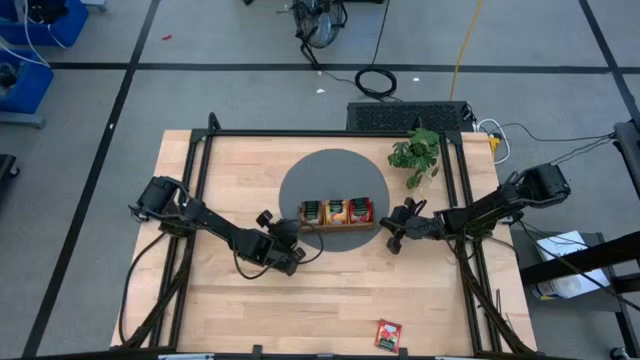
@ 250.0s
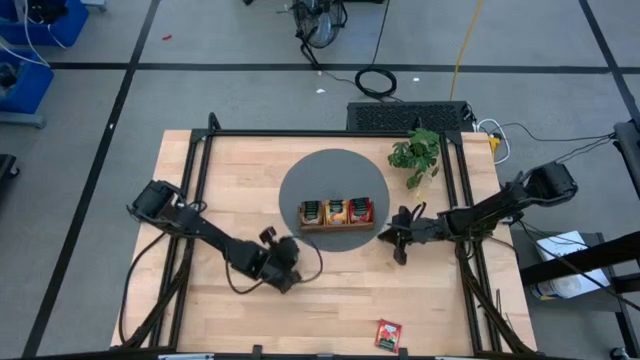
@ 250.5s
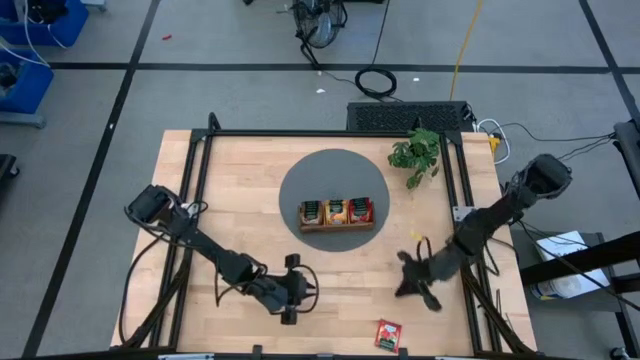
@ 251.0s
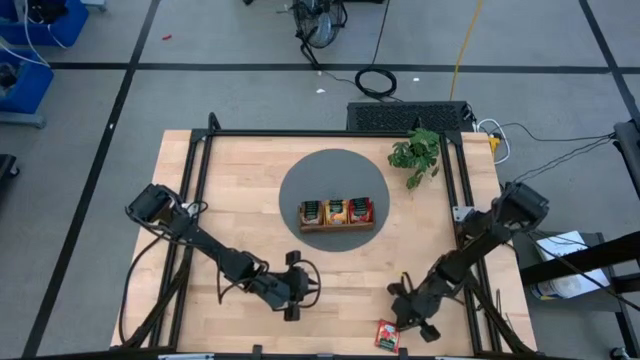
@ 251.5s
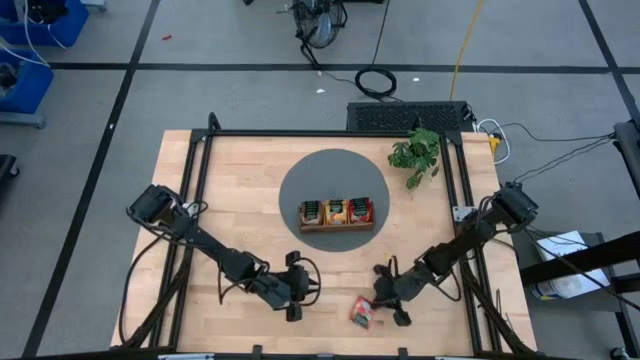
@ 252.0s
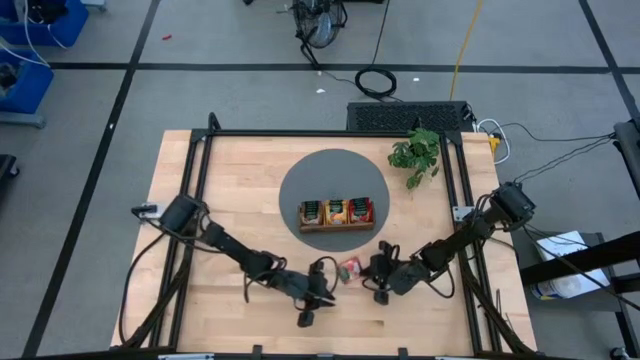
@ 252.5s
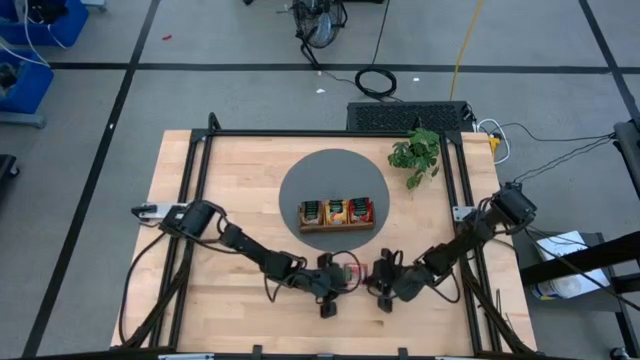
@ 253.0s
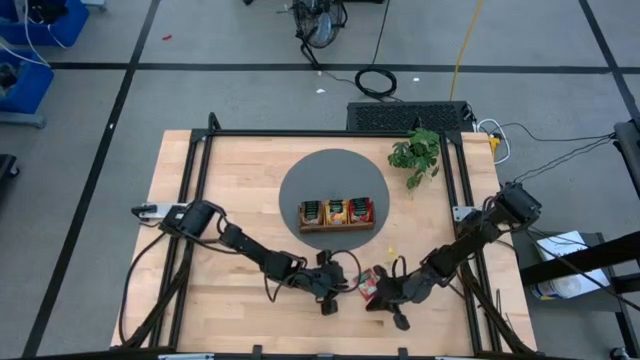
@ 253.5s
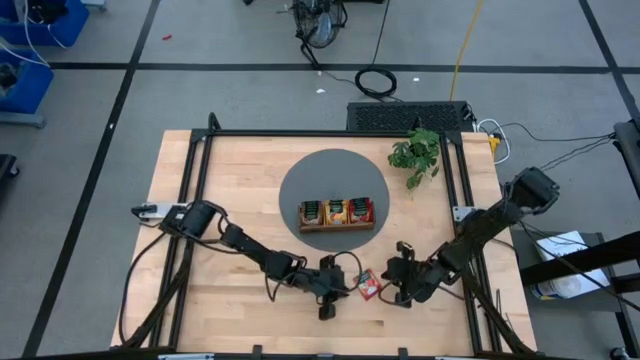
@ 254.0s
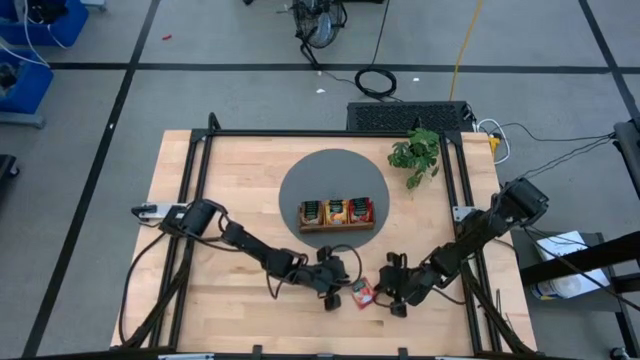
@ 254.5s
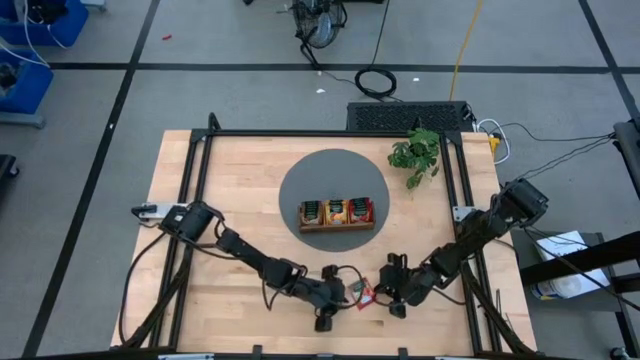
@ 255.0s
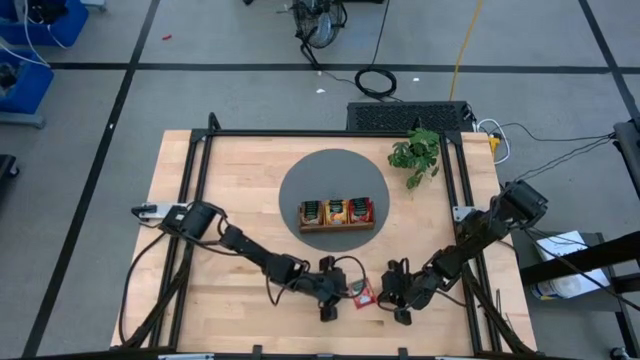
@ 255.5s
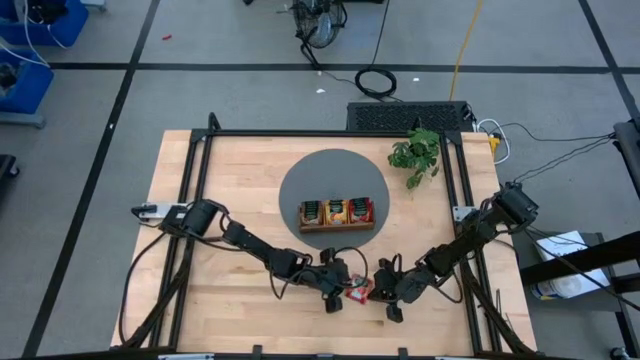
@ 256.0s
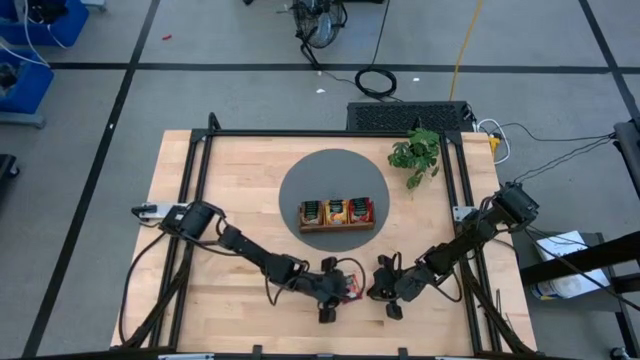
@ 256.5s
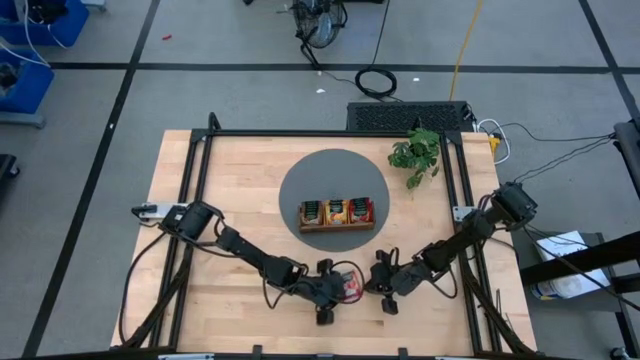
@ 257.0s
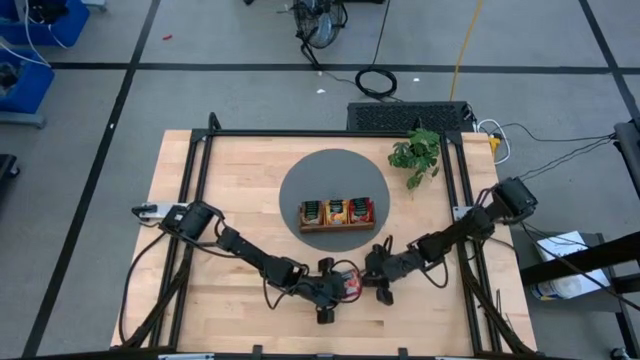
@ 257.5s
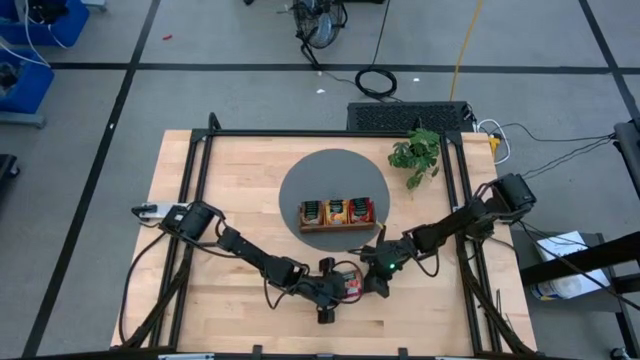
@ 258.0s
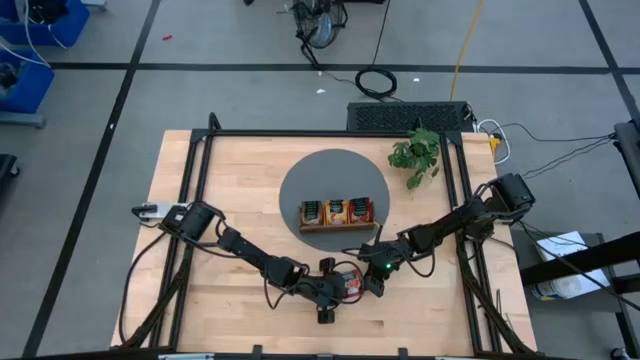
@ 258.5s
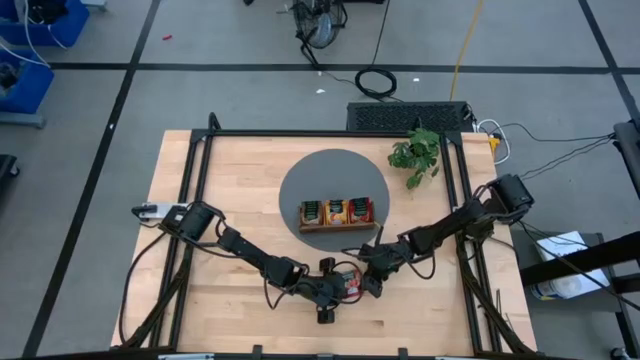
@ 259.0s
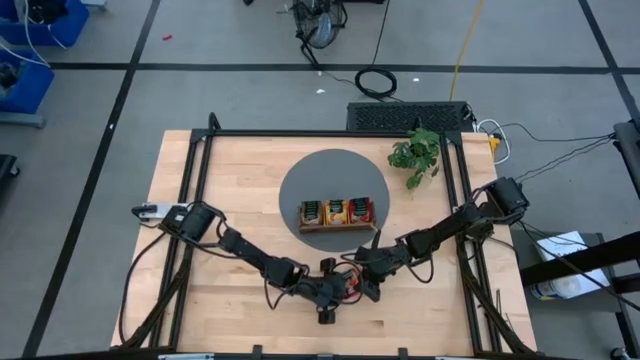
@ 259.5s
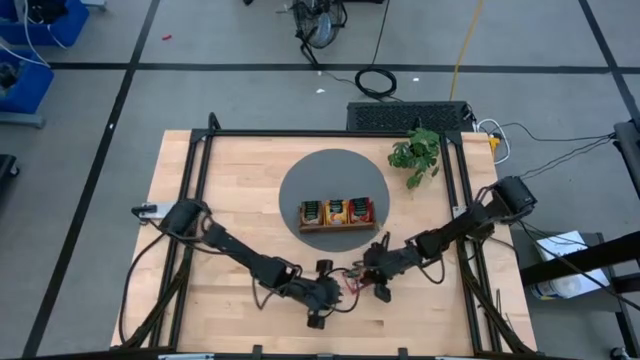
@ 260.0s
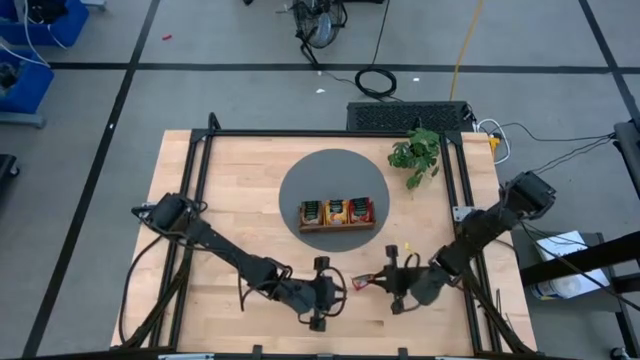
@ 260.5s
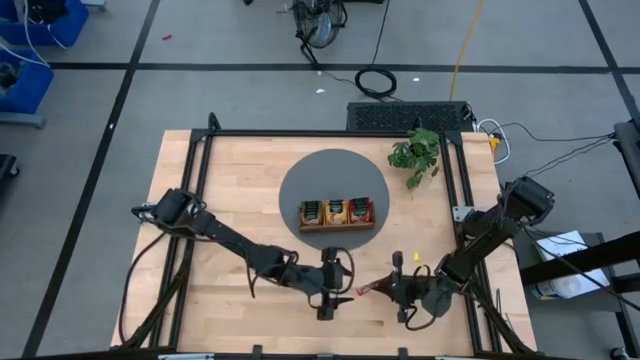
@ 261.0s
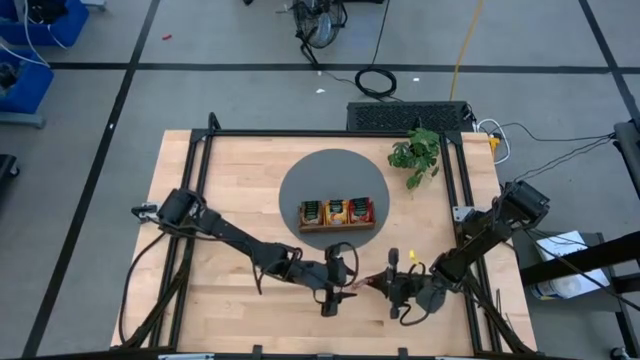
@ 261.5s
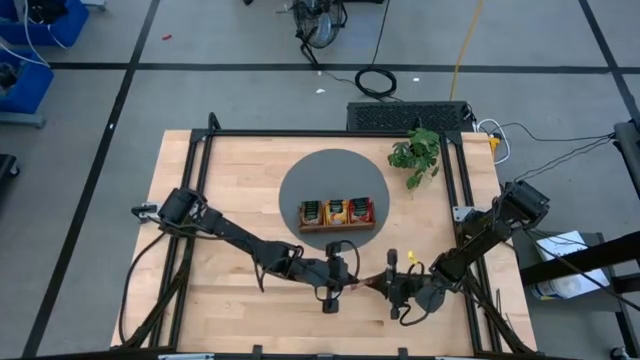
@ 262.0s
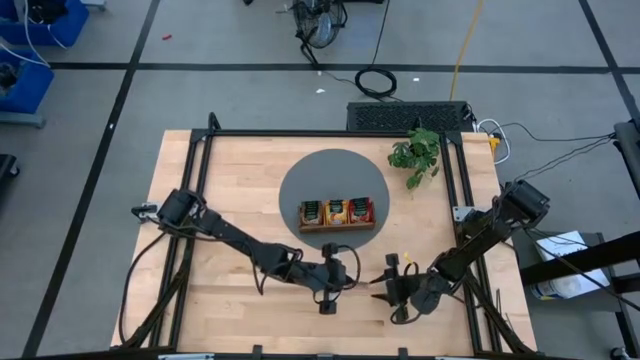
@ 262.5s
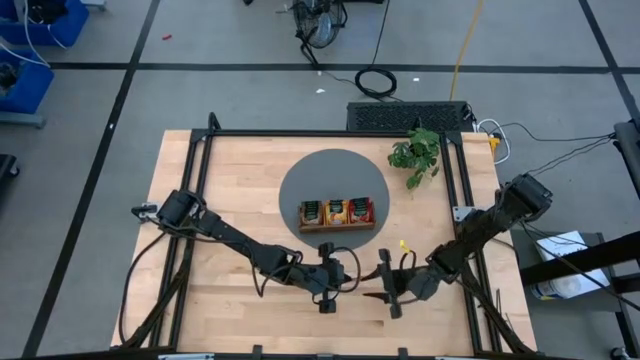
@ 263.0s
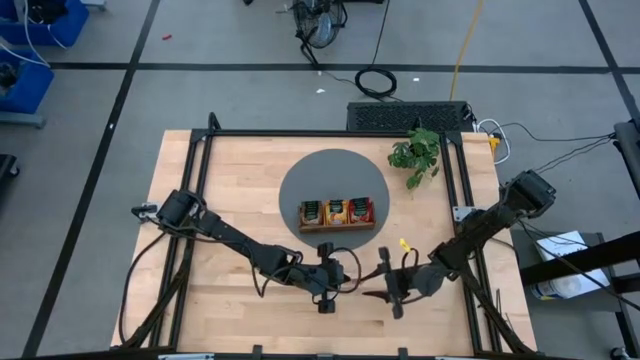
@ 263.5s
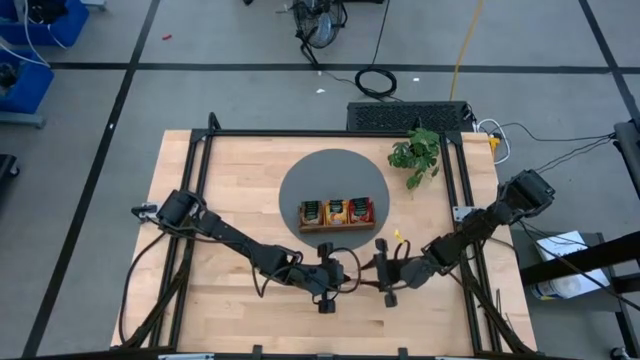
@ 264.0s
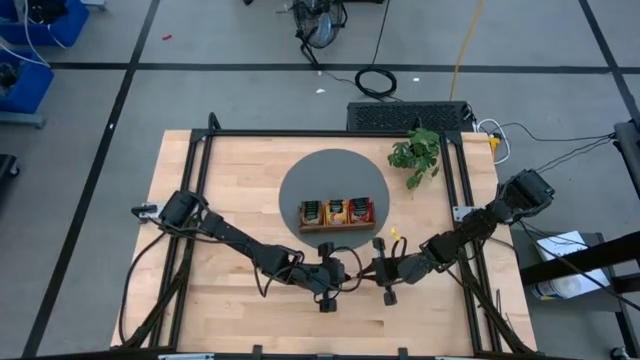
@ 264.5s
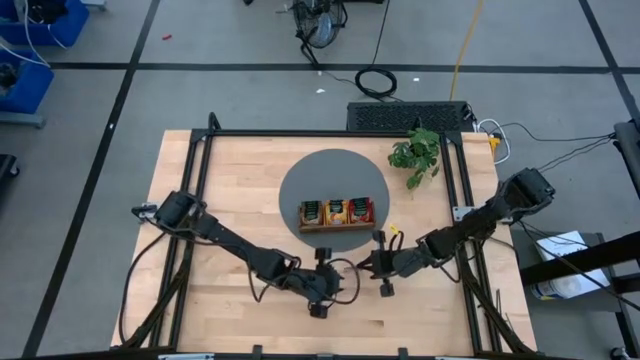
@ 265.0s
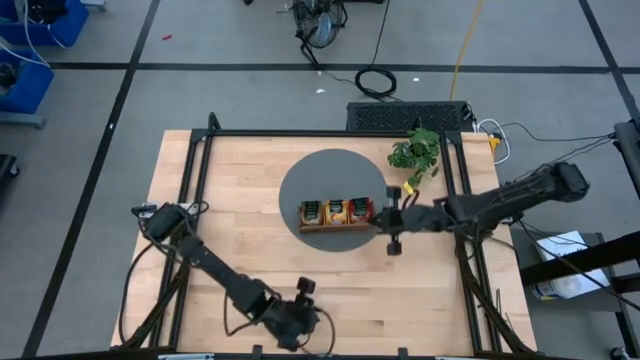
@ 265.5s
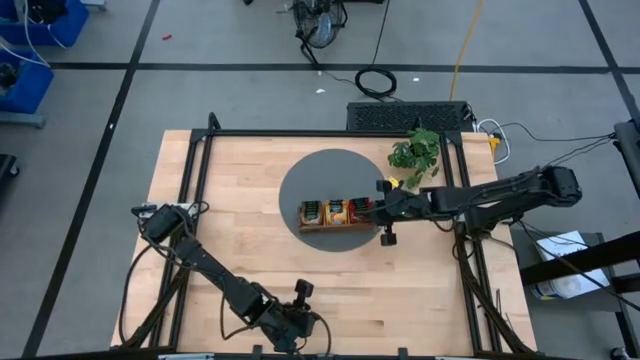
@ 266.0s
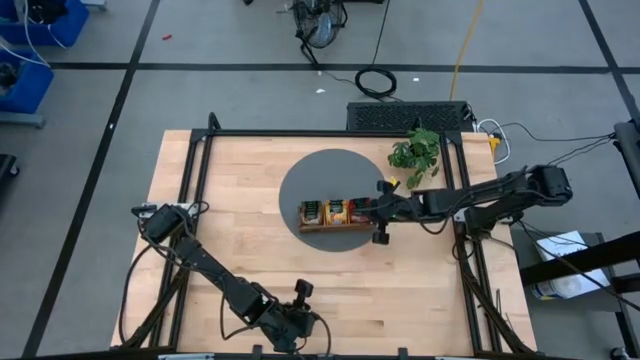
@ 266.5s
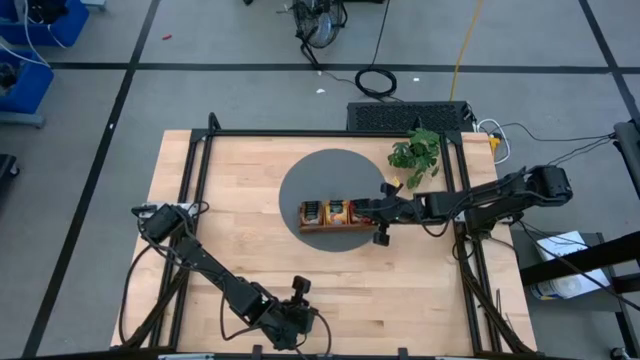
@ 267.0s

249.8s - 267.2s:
Task: Pick & Place Tea
Put the red tea bag into the right slot of the wooden organizer

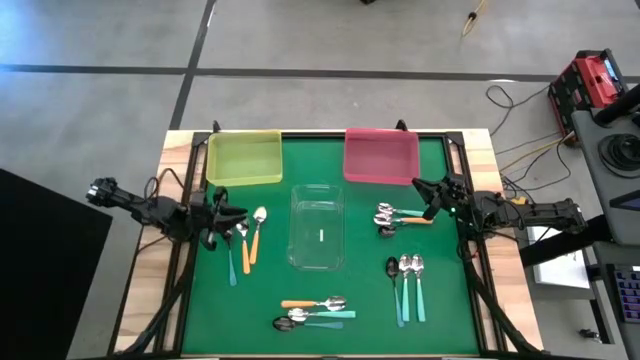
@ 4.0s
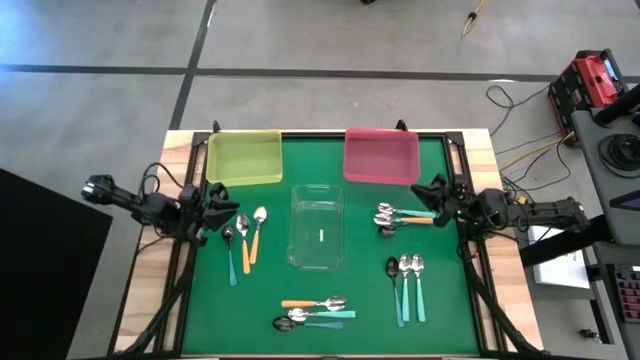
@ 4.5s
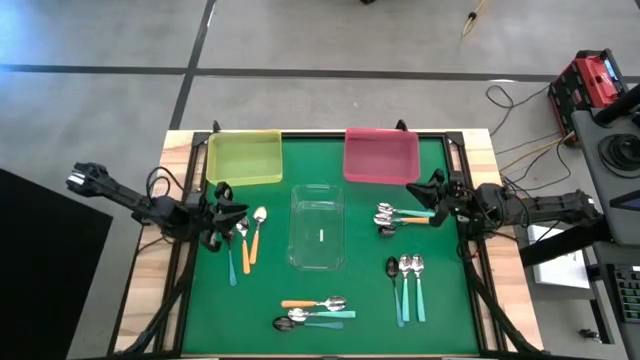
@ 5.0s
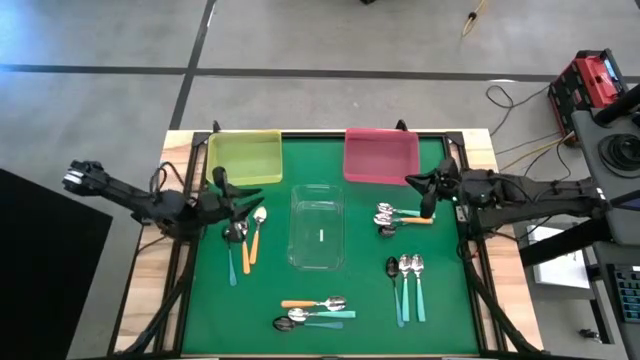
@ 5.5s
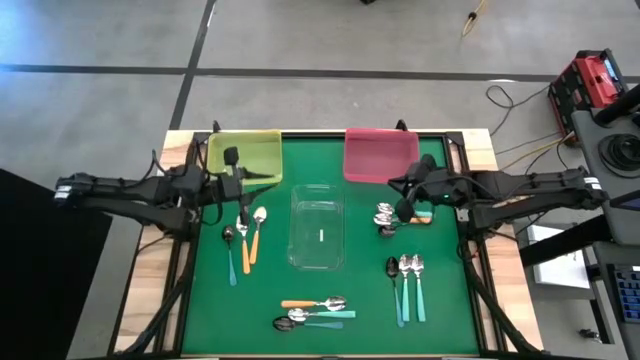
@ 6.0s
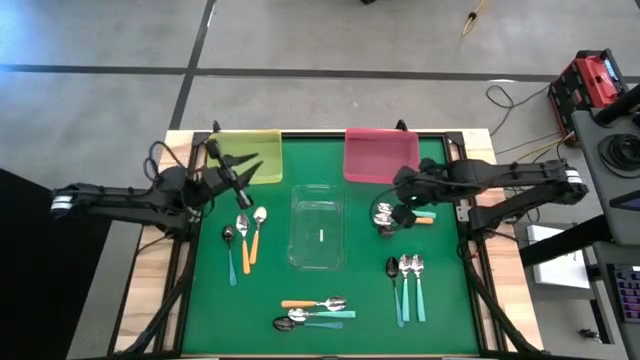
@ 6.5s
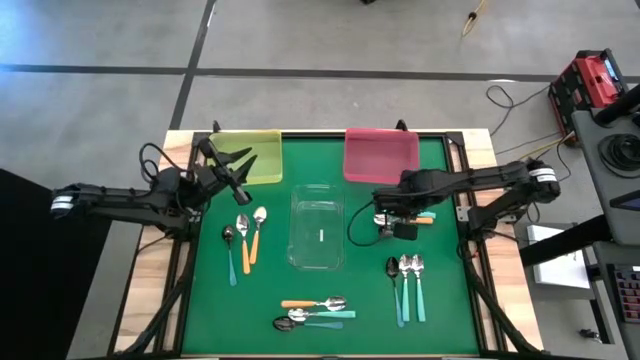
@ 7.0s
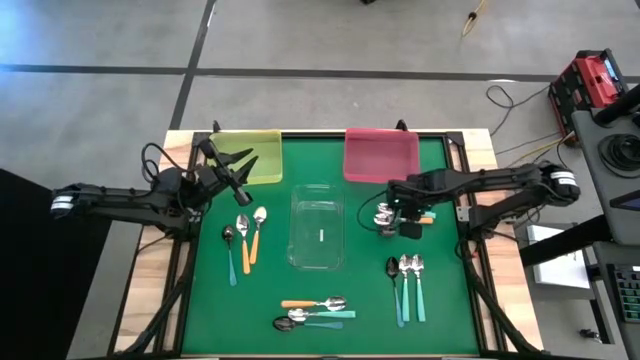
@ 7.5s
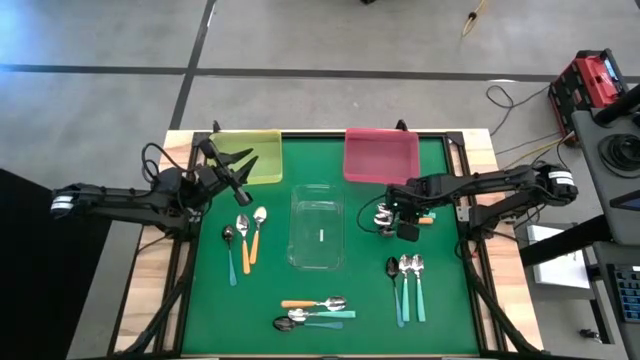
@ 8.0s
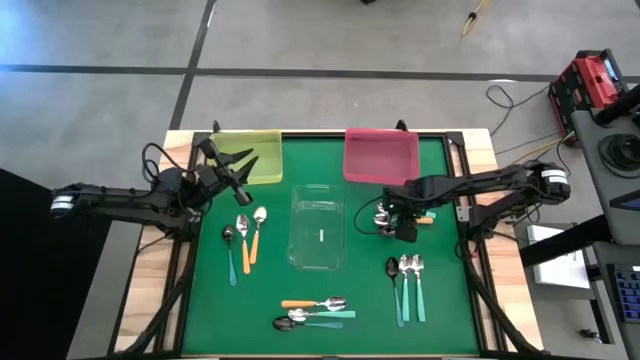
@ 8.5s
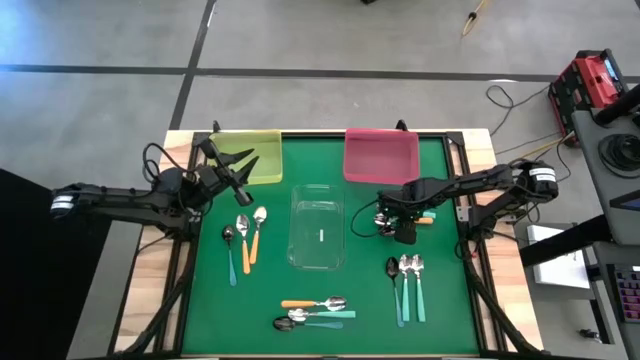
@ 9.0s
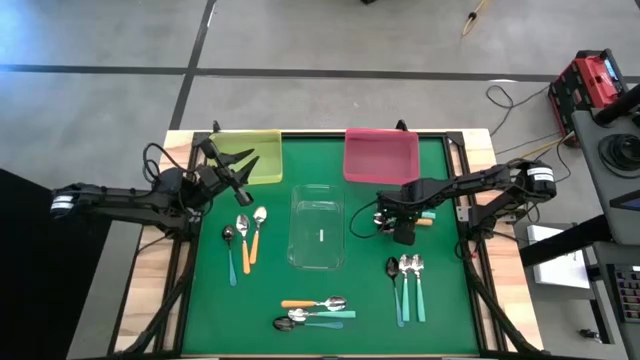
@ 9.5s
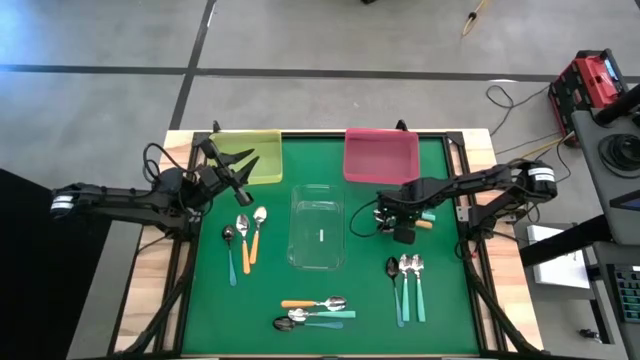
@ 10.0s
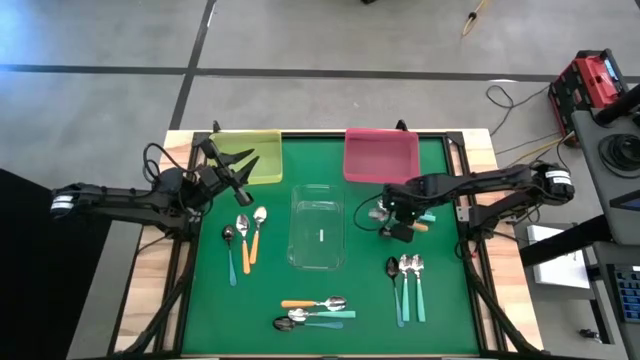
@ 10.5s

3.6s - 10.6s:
Task: Sort silverware by color (type)
Put the top right yellow spoon into the transparent bin
